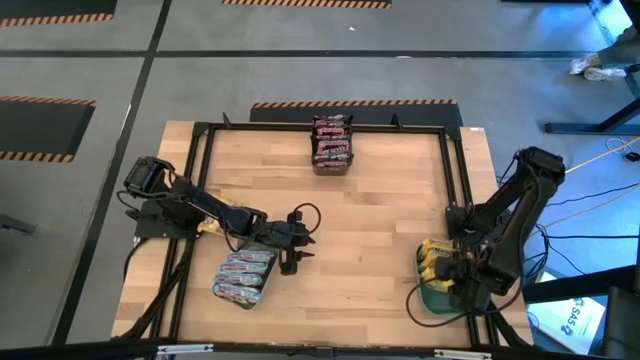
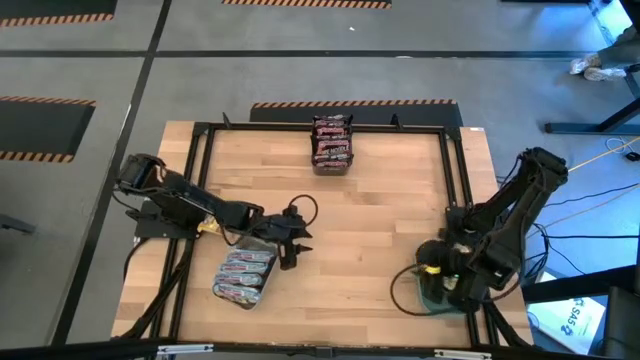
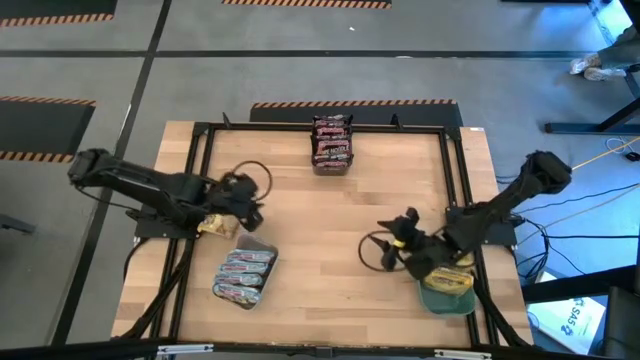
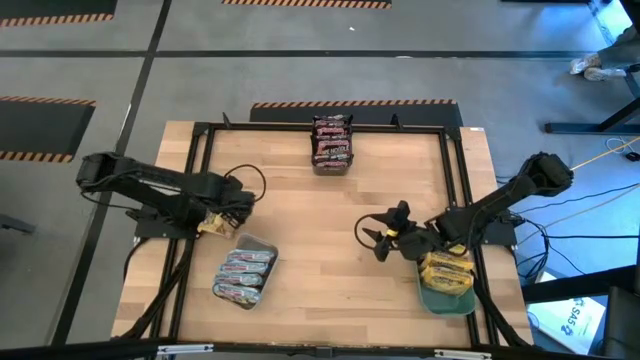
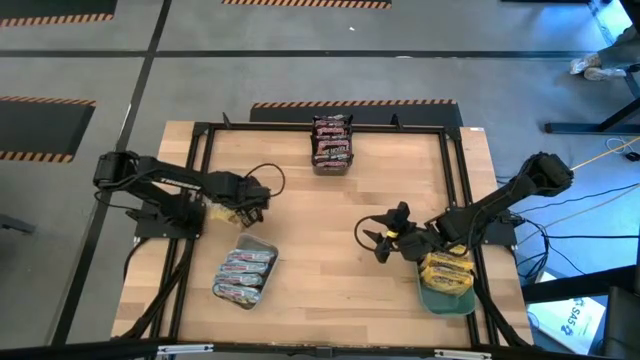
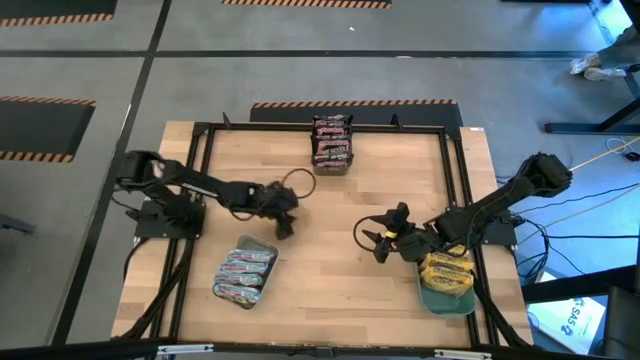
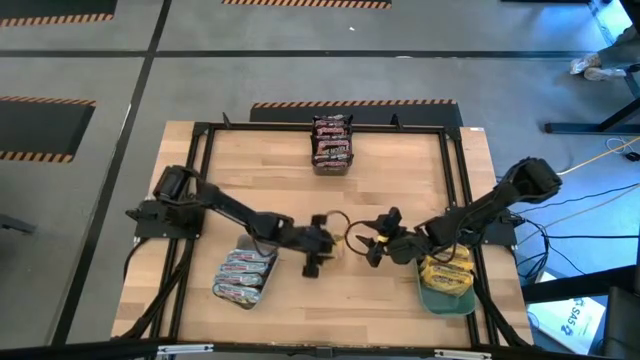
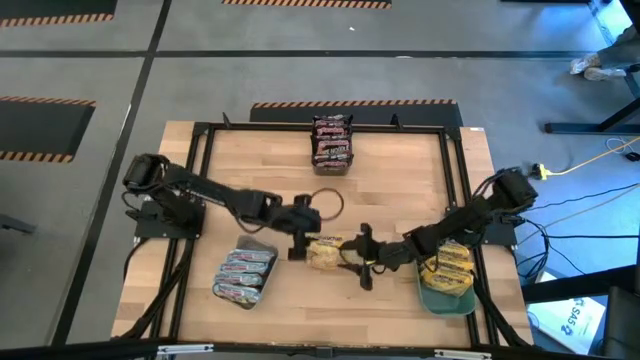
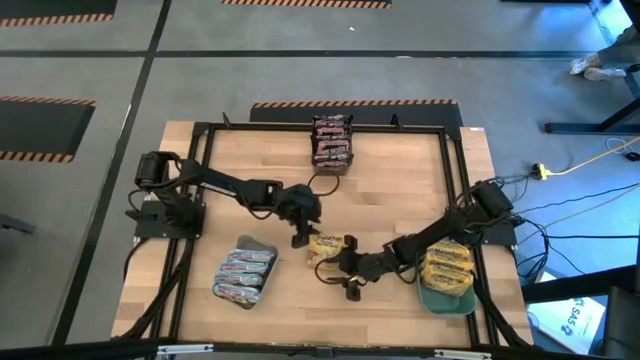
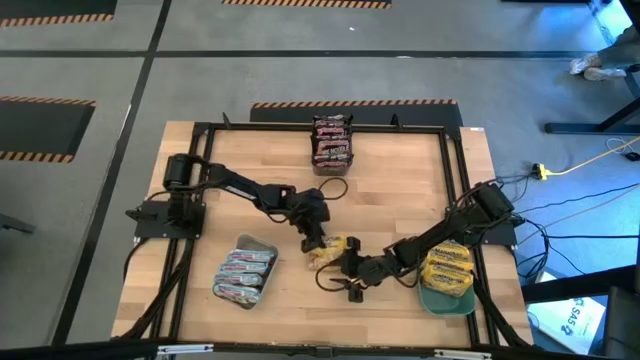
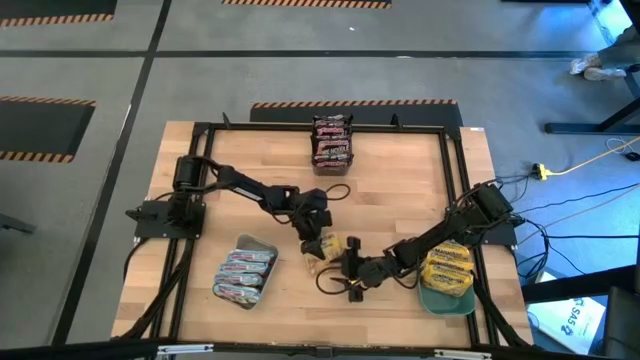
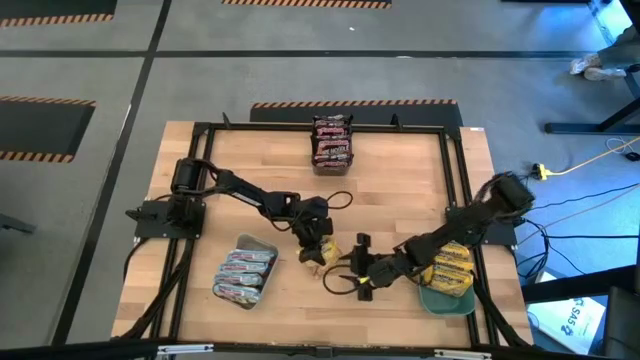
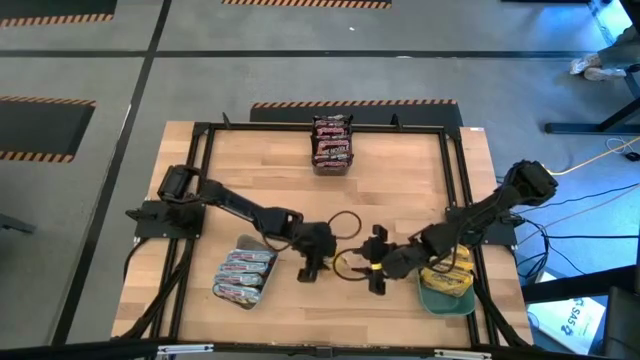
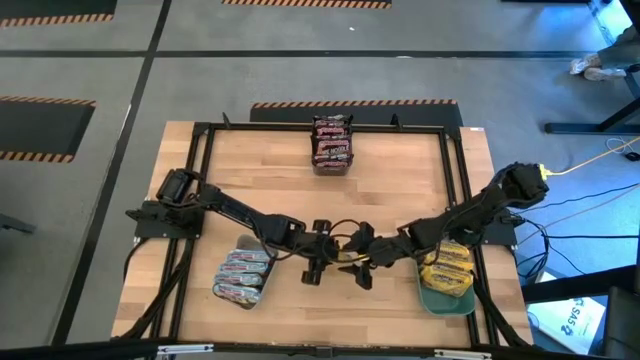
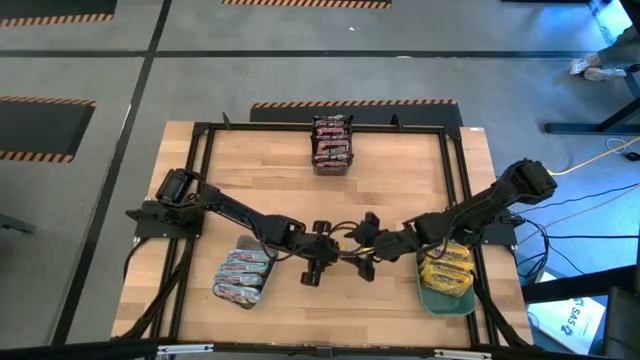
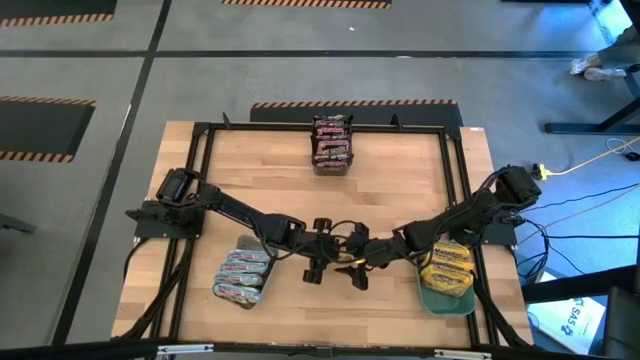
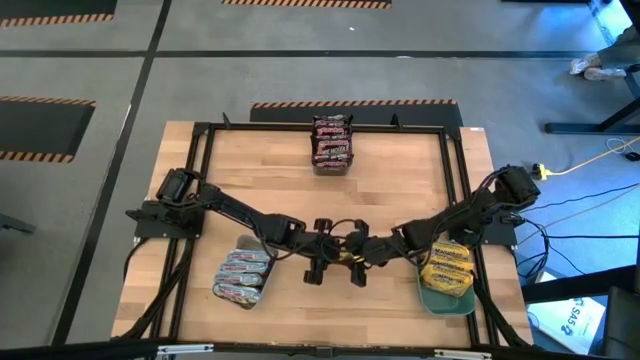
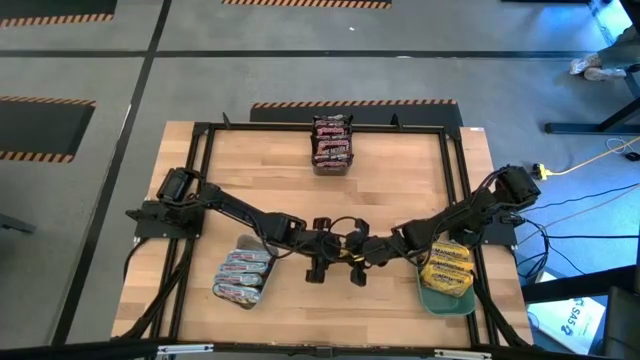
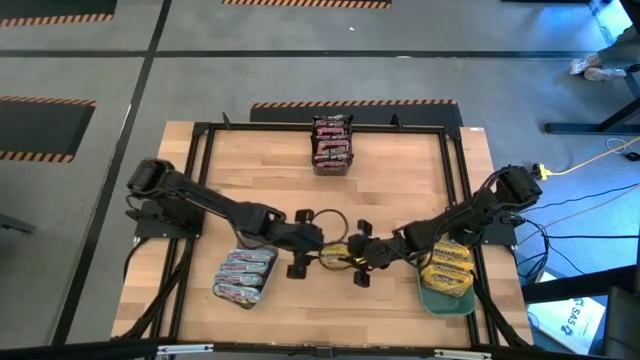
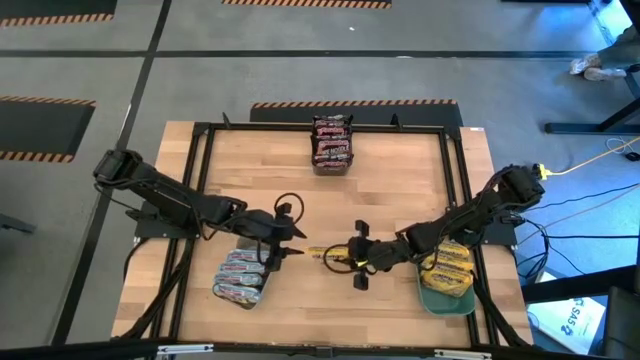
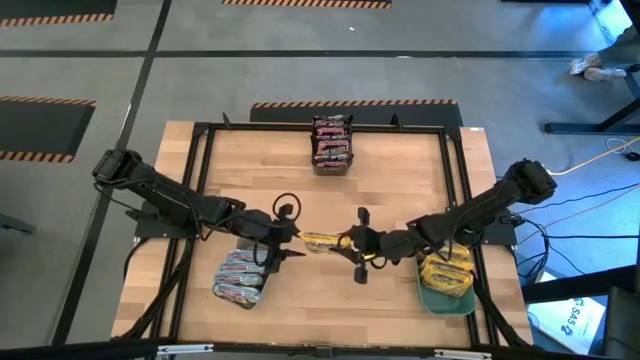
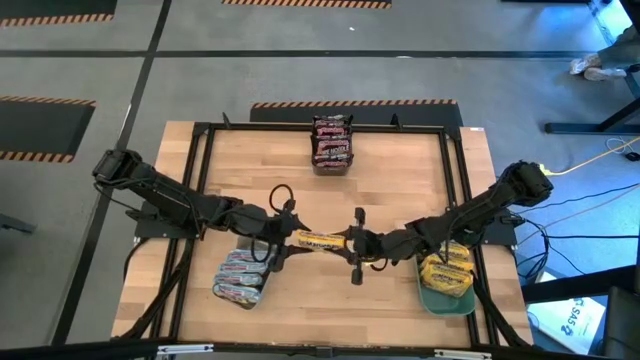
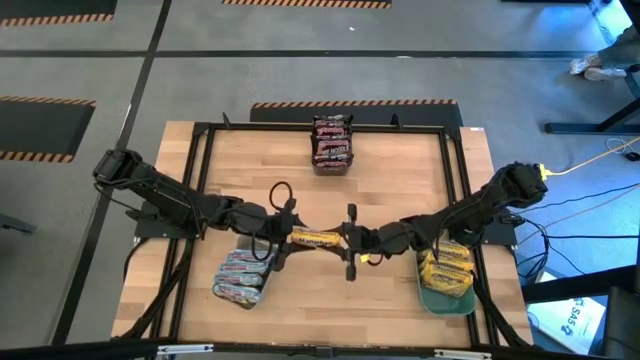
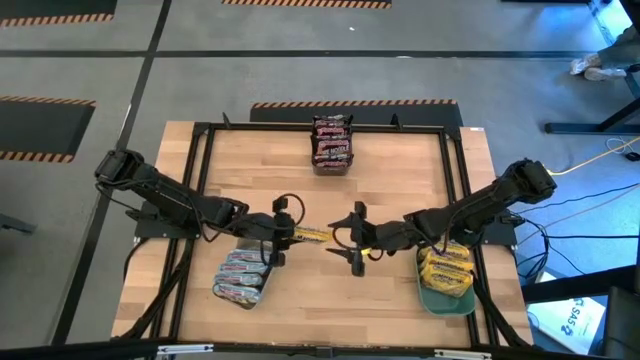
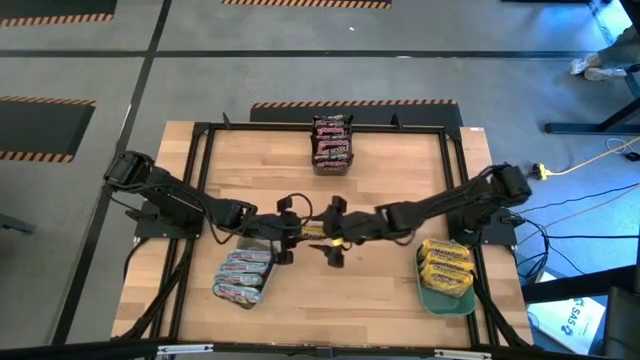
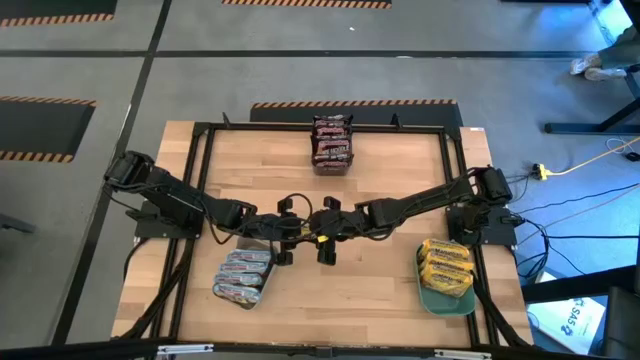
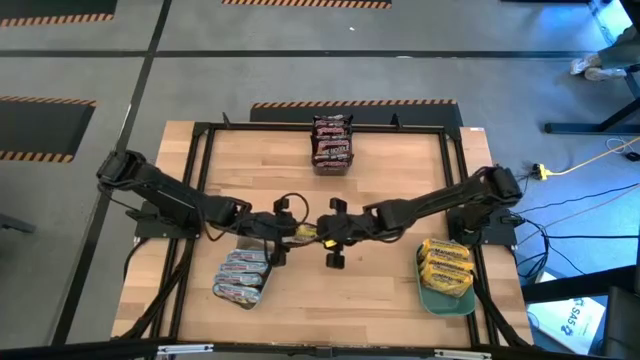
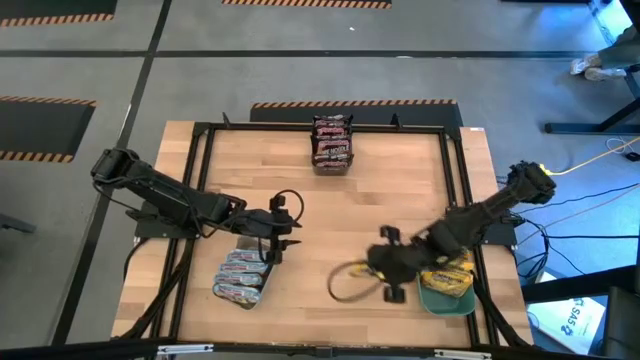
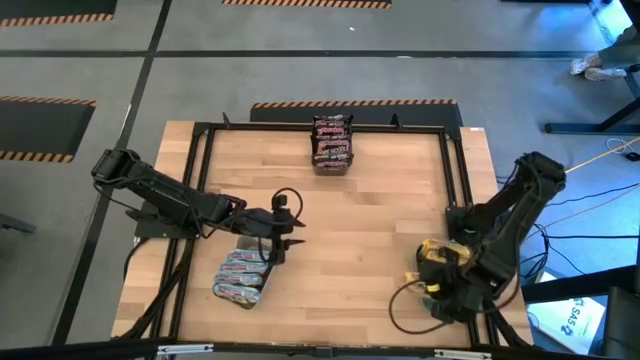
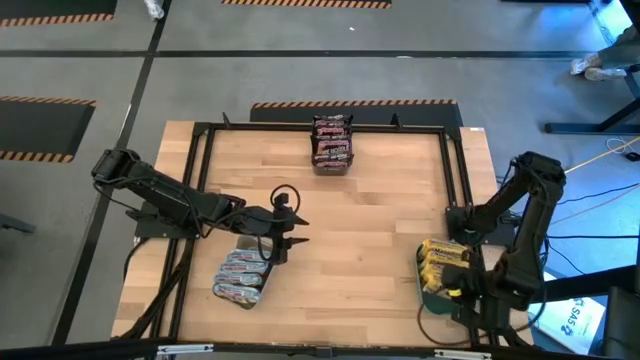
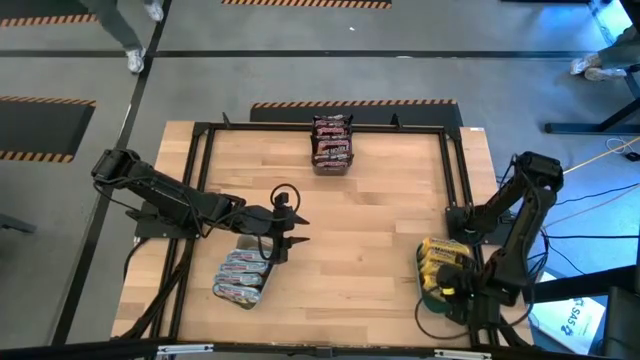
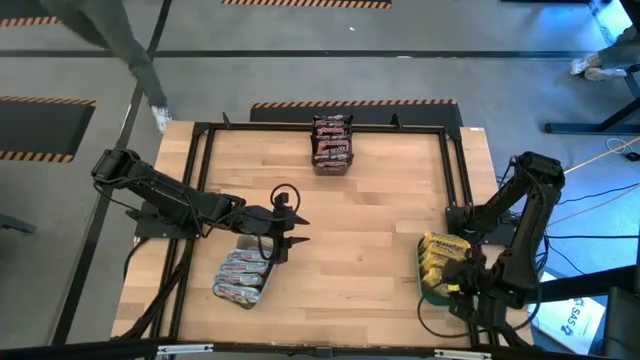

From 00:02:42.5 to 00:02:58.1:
Task: Sort Maruchan noodles
Put the yellow noodle pack into the green bin

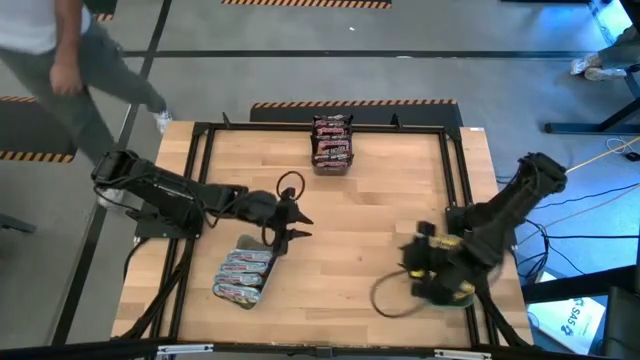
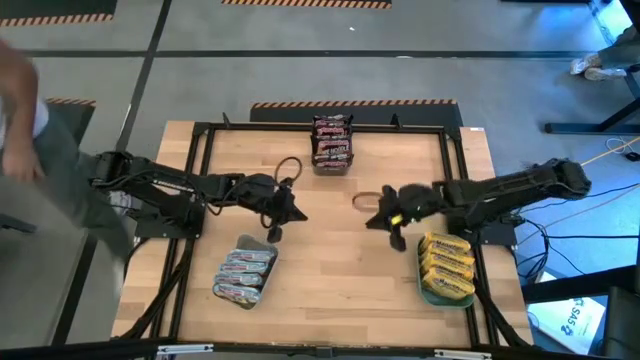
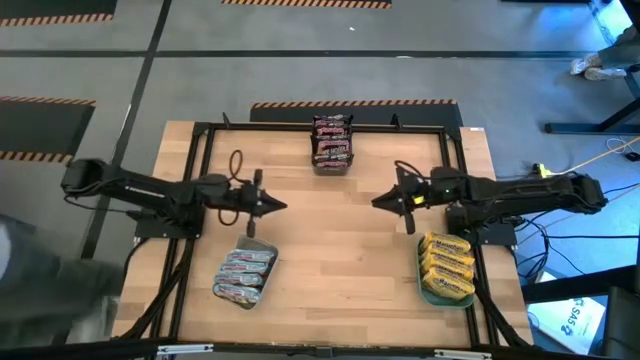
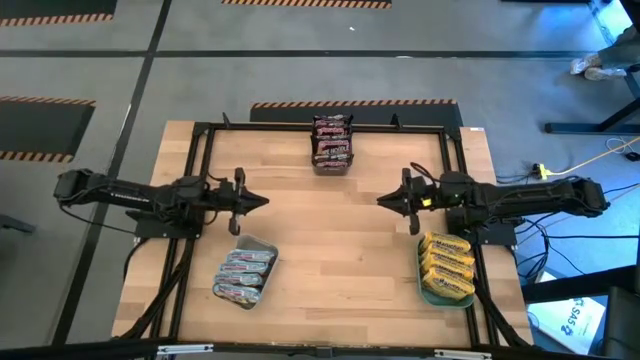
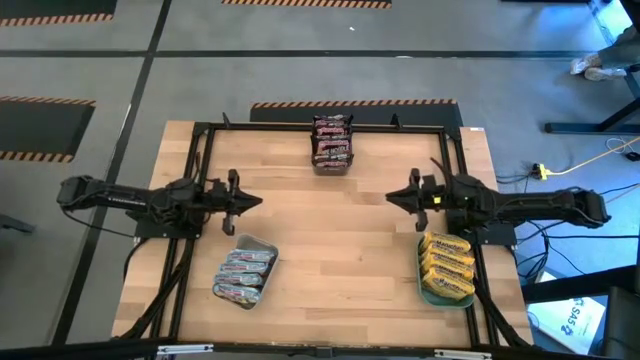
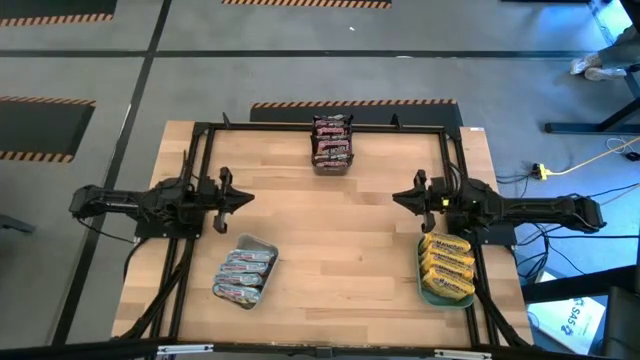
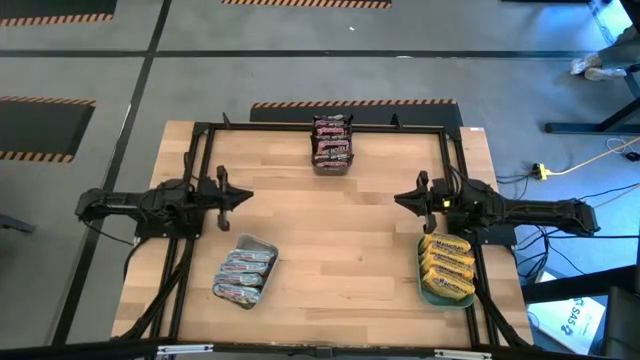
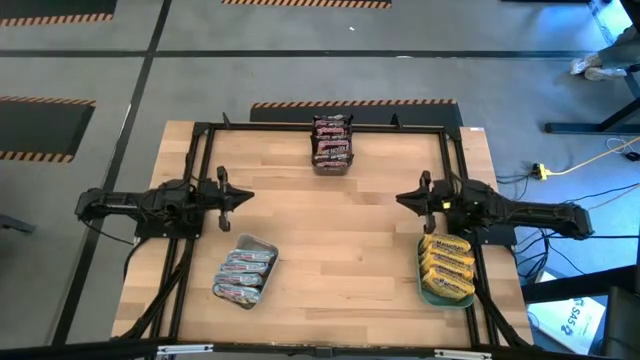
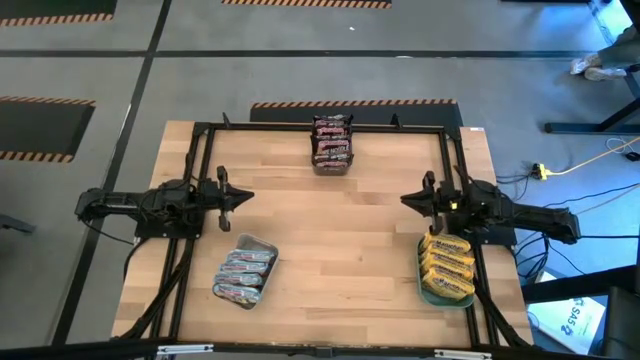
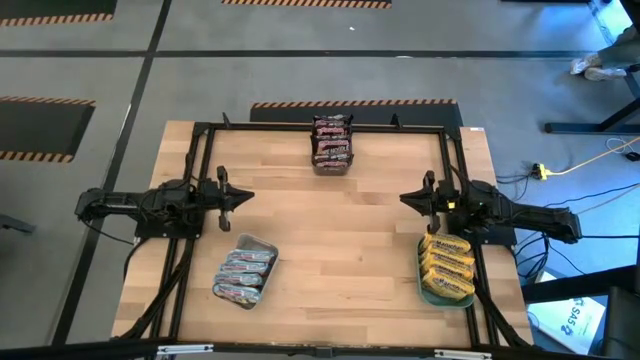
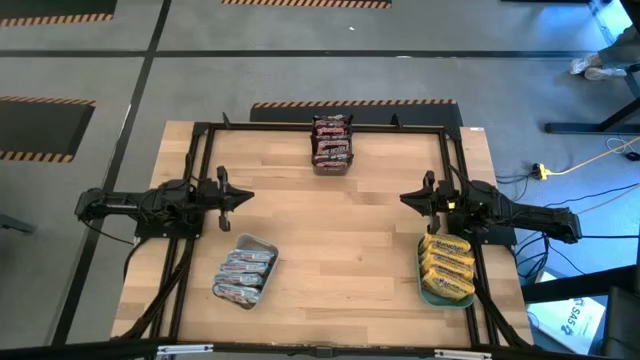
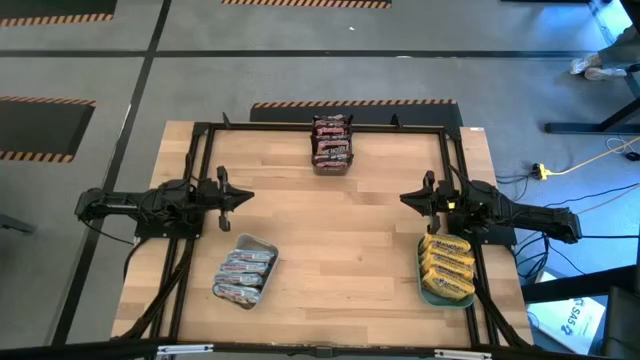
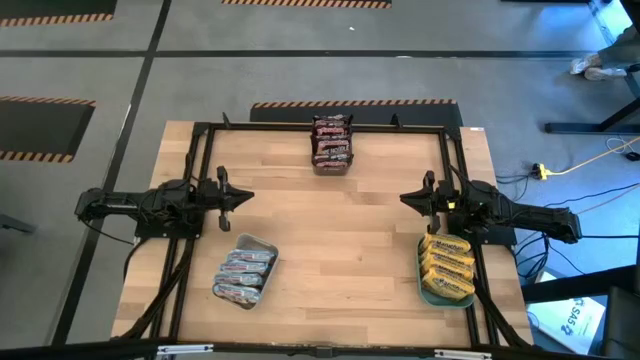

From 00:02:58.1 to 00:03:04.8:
Return to Home Position
